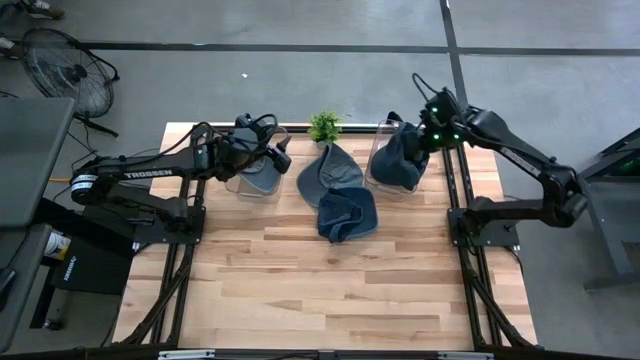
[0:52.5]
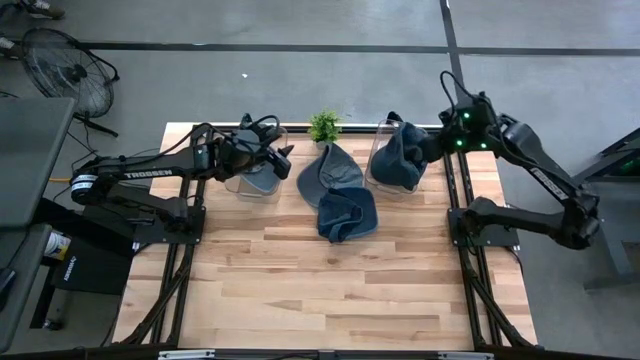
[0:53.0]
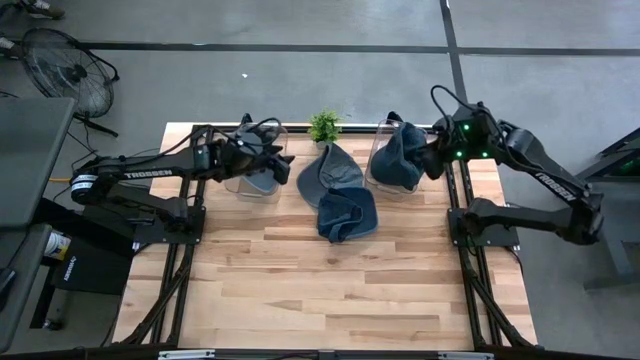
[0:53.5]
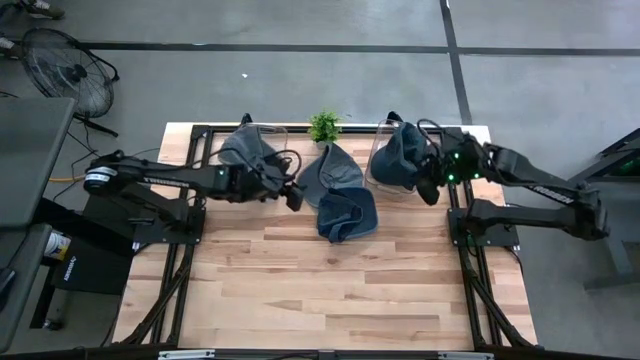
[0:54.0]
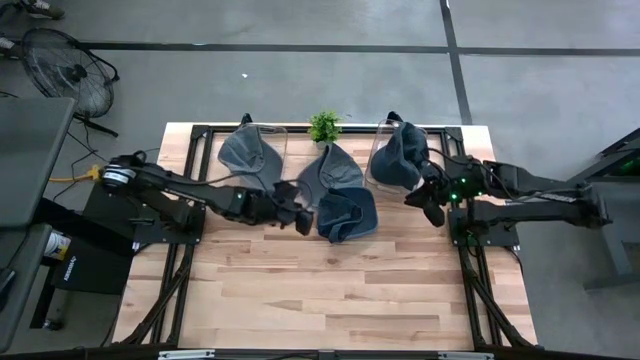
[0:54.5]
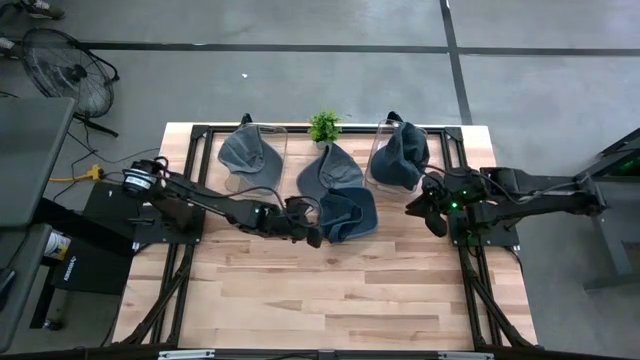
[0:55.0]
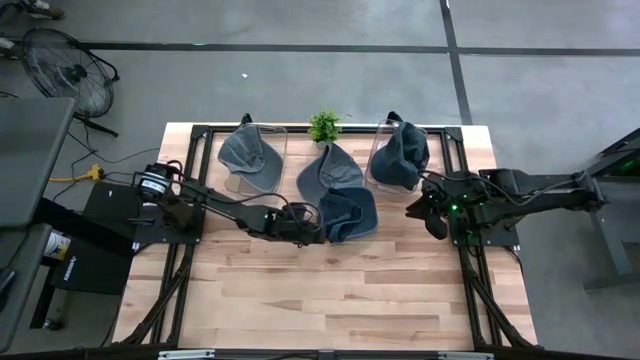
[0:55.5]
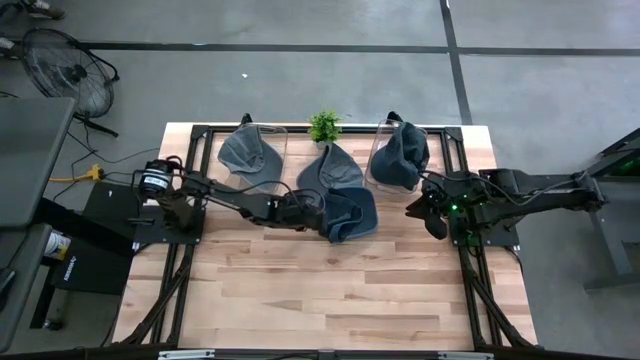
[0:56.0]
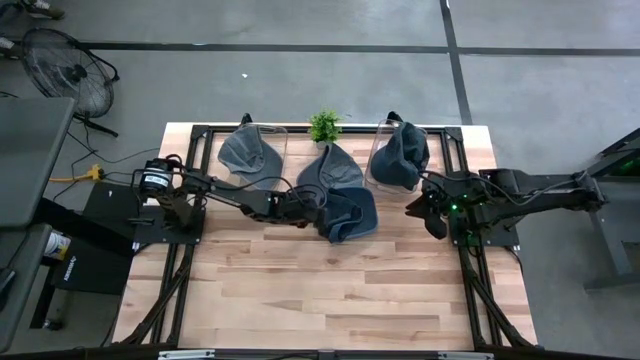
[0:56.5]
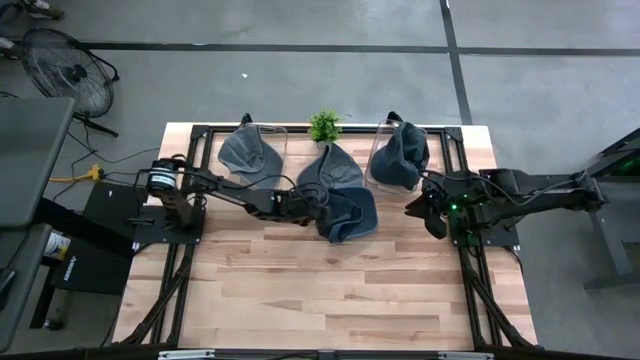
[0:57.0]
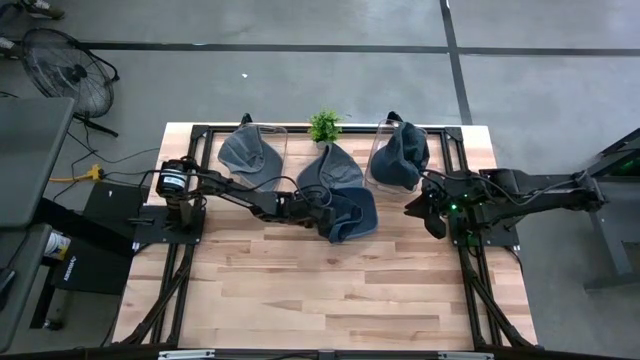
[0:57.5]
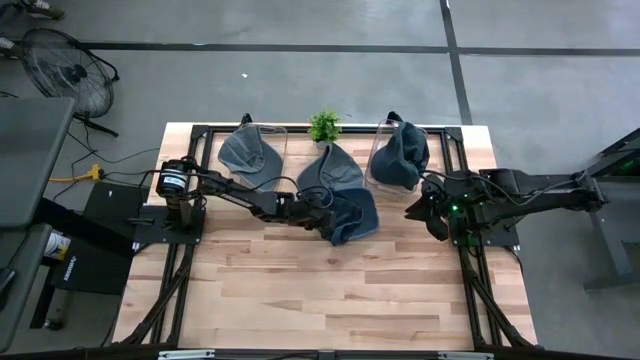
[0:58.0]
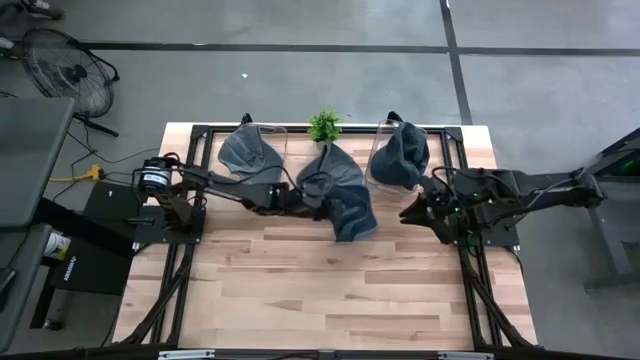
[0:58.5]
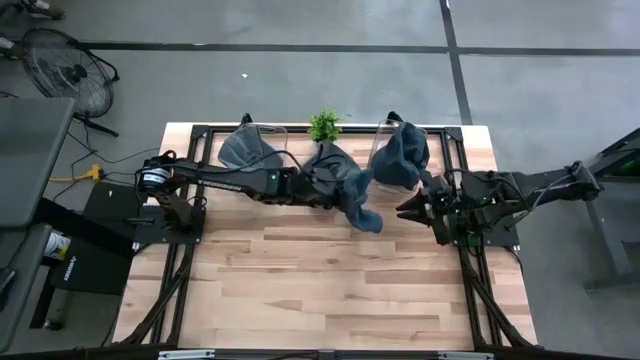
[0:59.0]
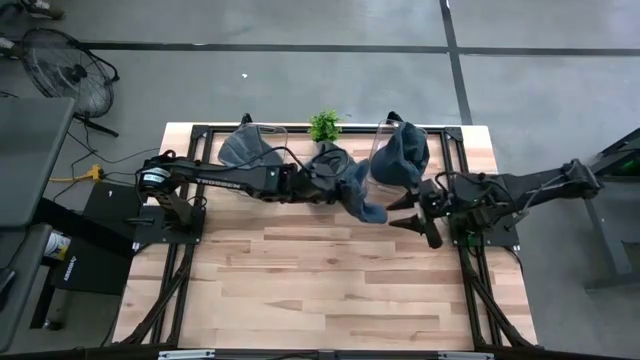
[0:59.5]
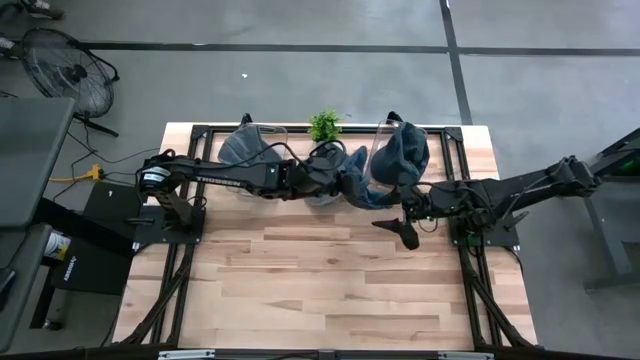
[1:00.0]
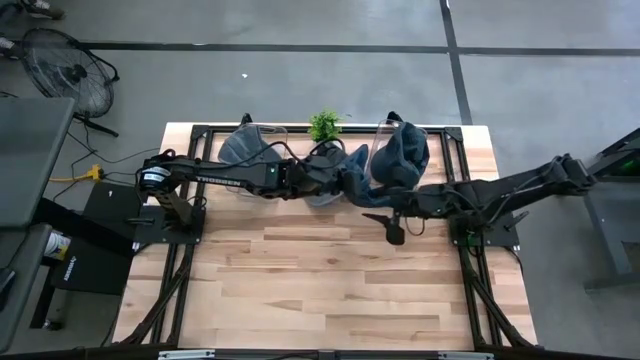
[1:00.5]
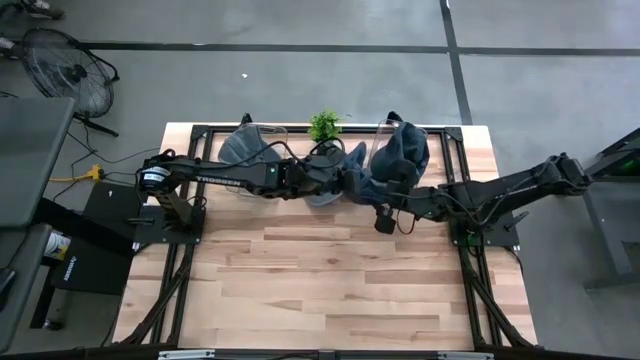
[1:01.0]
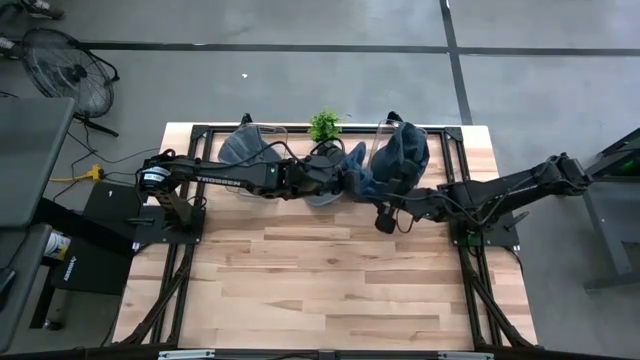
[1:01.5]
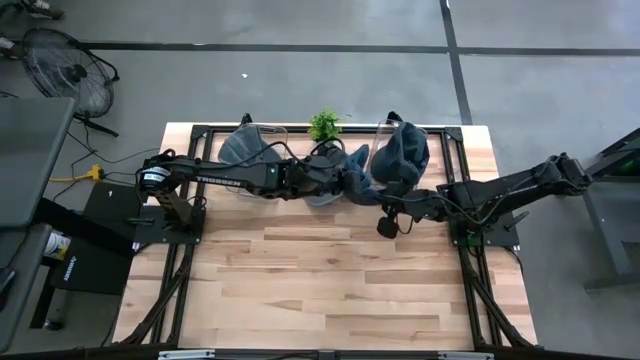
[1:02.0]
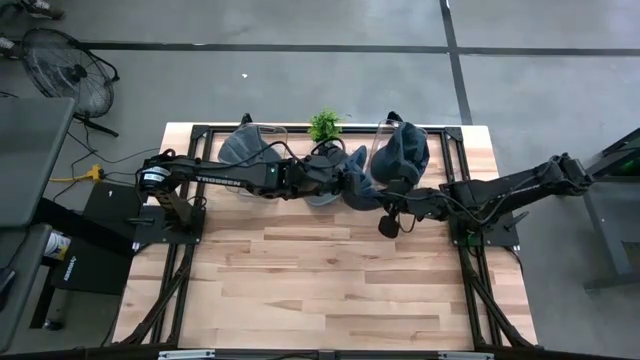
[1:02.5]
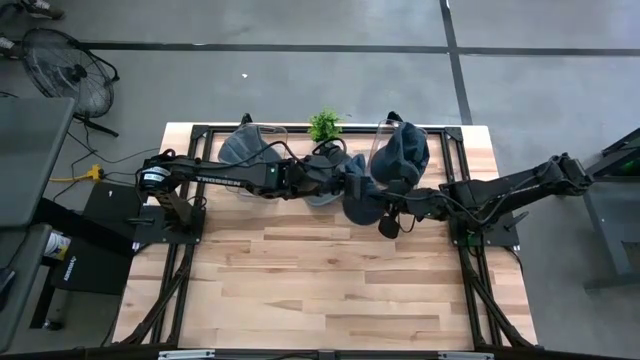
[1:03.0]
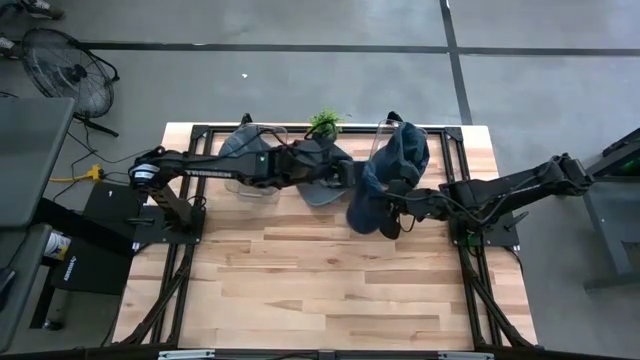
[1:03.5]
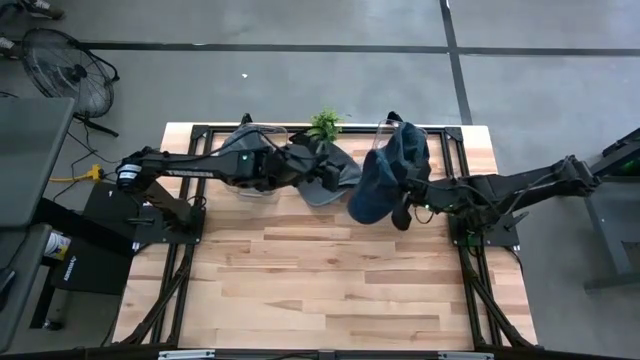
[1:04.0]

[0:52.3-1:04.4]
Task: Pick & Place hat
Put the blue cap into the right transparent bin

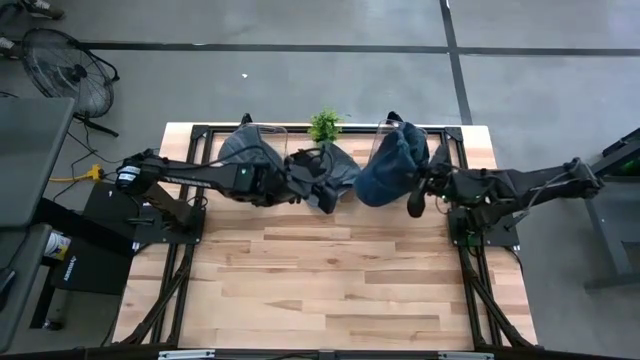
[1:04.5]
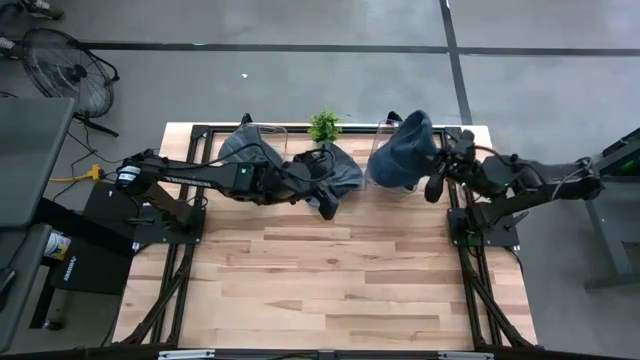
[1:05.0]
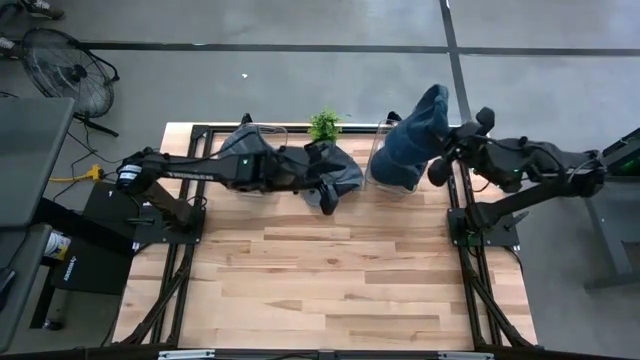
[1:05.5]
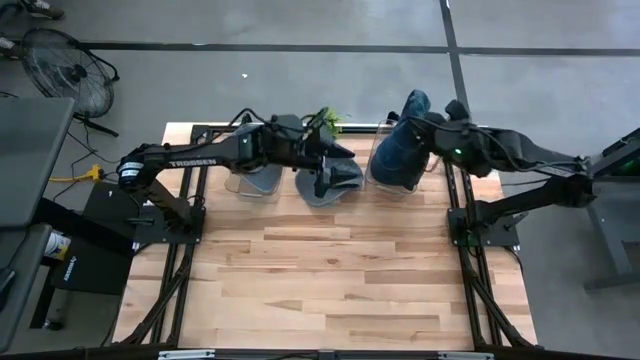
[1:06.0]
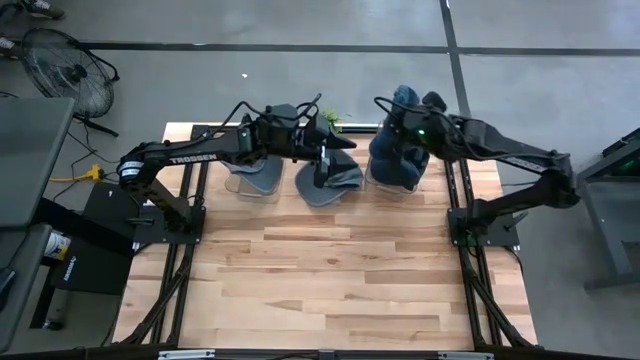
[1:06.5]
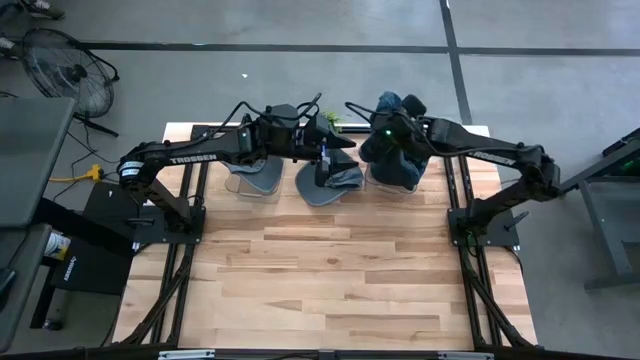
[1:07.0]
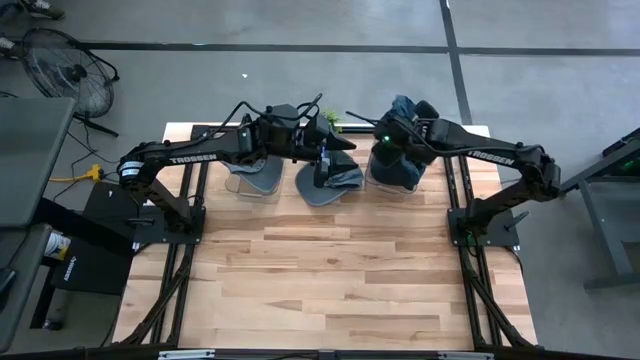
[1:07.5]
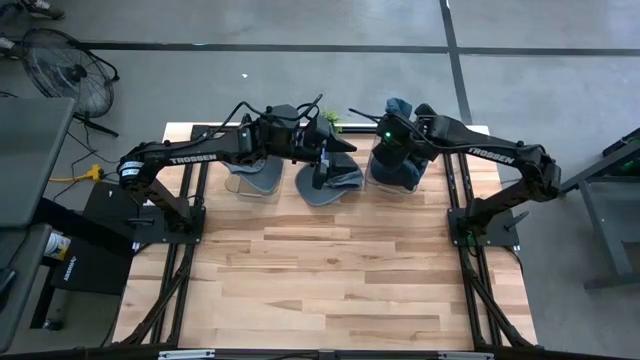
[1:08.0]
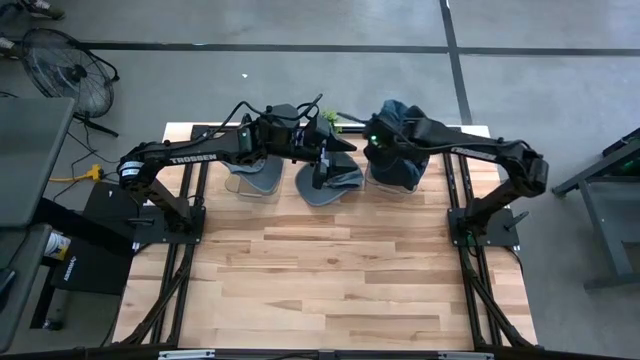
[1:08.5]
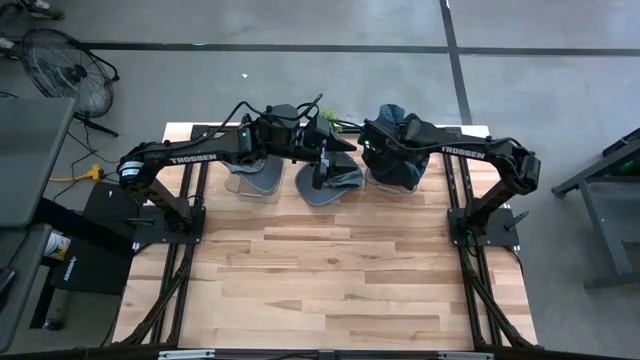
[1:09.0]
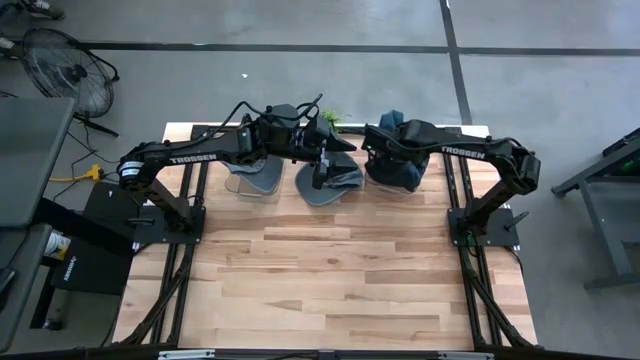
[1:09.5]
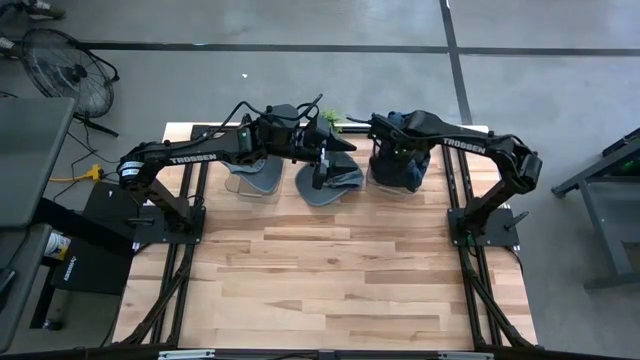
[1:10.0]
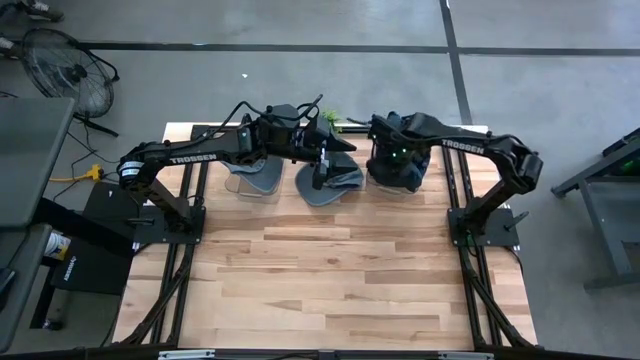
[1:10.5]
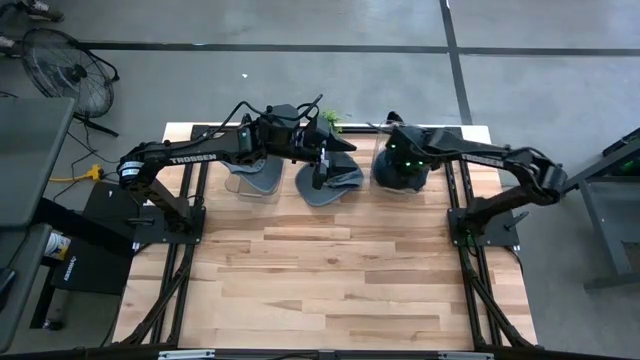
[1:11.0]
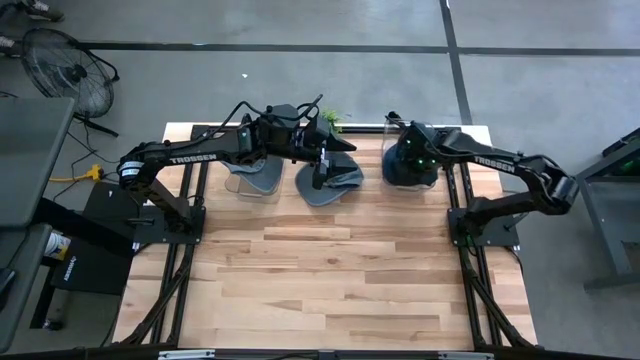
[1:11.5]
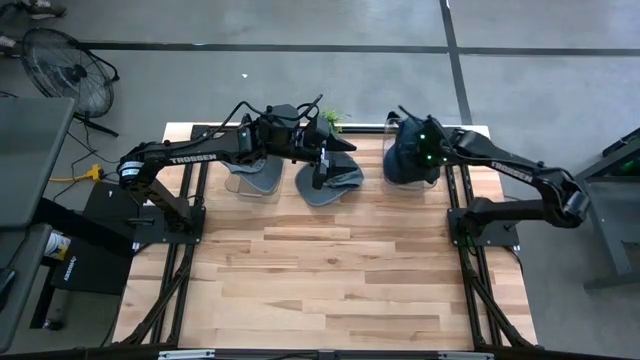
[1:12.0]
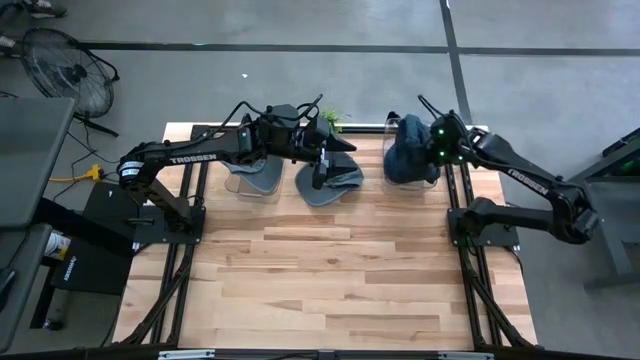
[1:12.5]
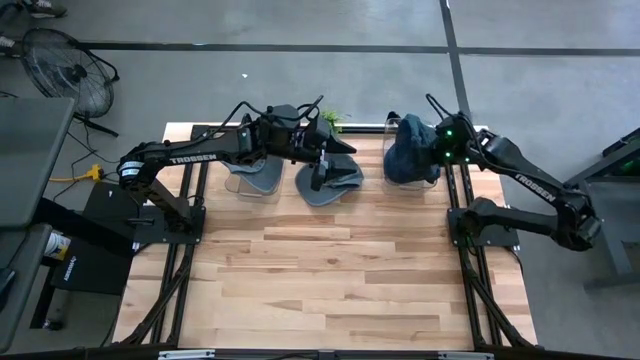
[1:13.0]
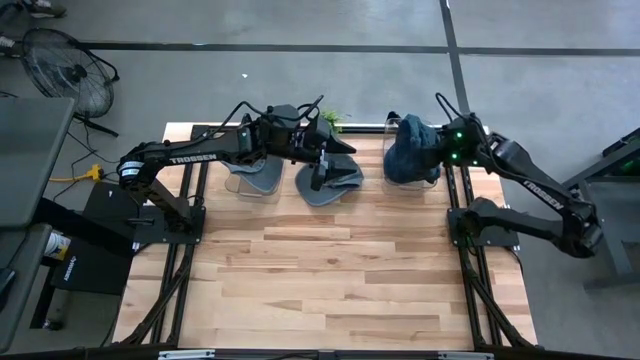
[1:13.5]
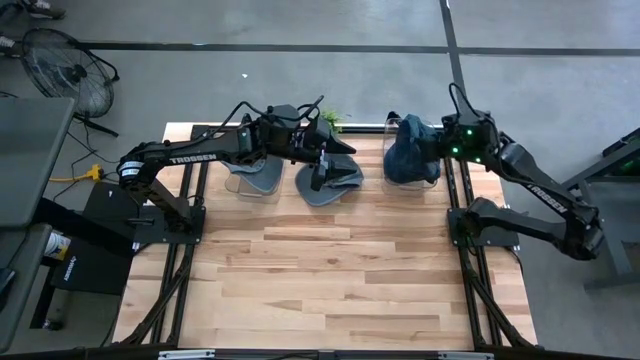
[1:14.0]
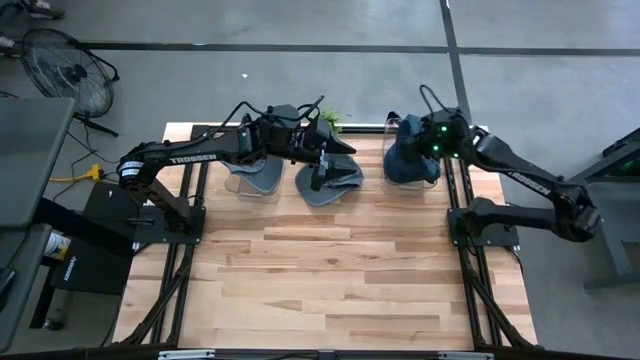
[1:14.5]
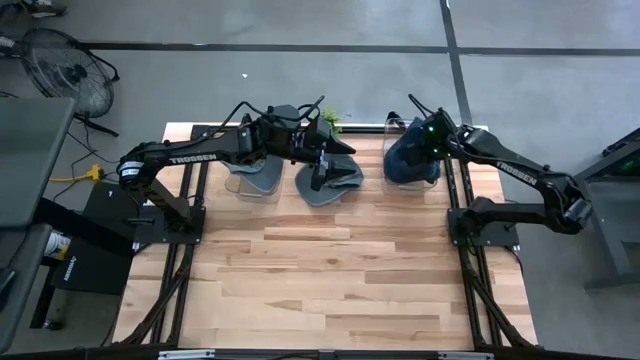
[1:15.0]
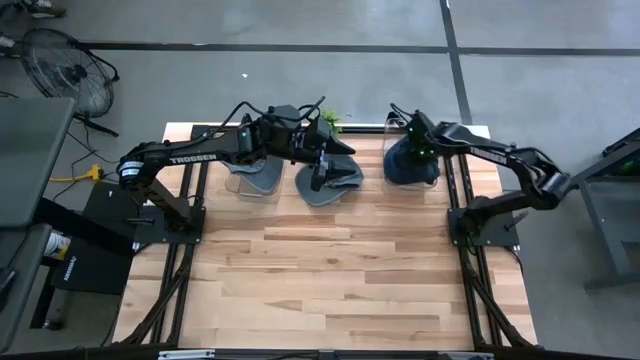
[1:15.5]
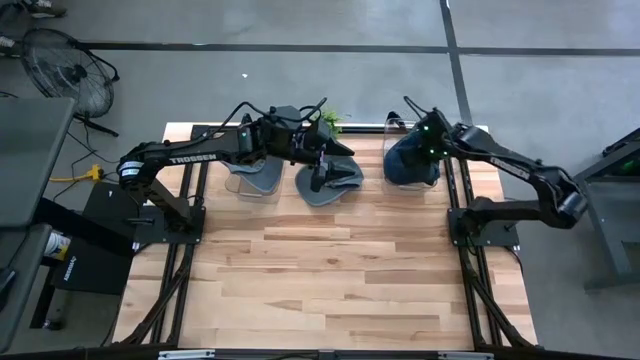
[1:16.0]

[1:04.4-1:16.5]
Put the blue cap into the right transparent bin
